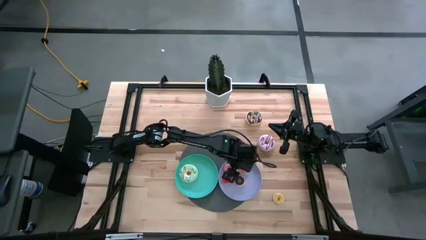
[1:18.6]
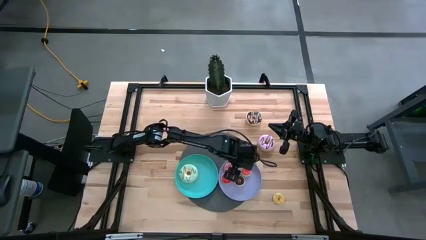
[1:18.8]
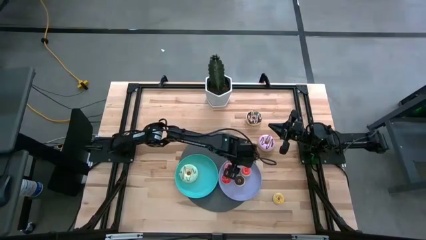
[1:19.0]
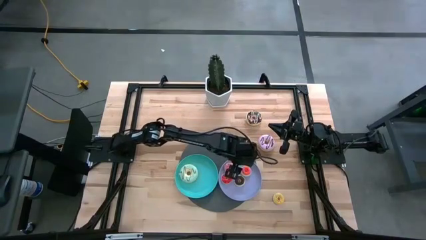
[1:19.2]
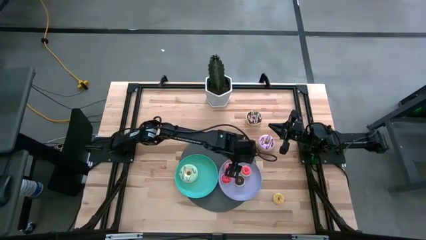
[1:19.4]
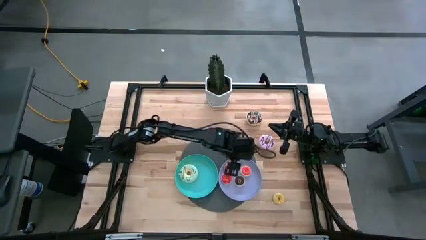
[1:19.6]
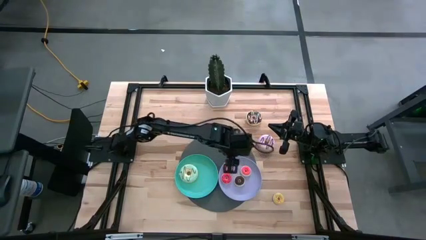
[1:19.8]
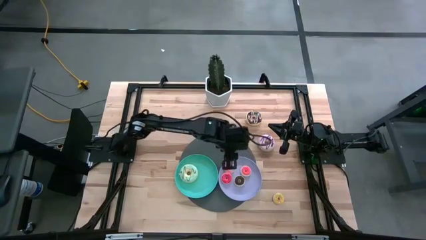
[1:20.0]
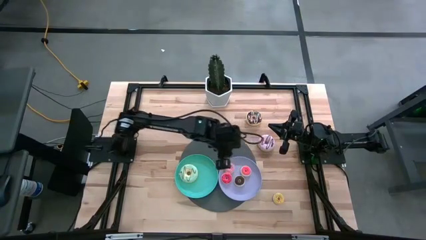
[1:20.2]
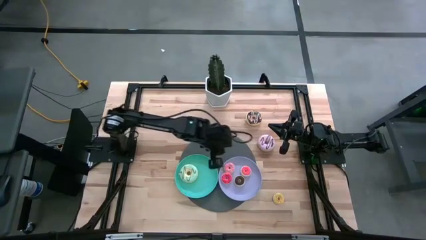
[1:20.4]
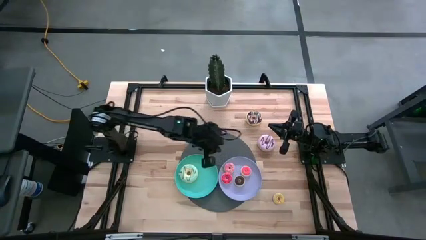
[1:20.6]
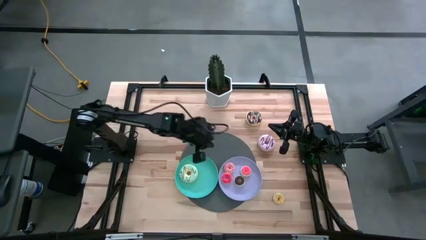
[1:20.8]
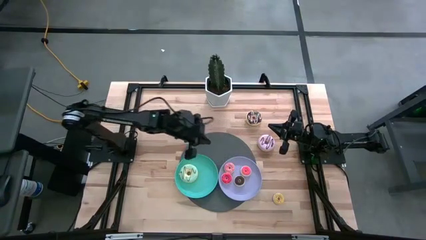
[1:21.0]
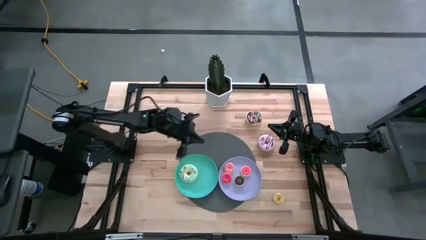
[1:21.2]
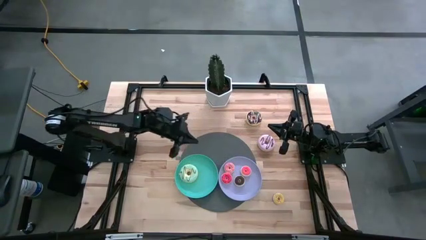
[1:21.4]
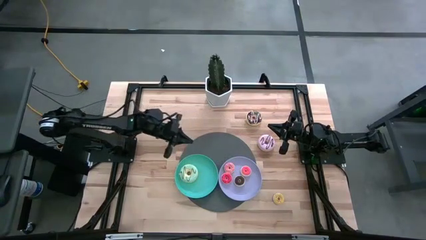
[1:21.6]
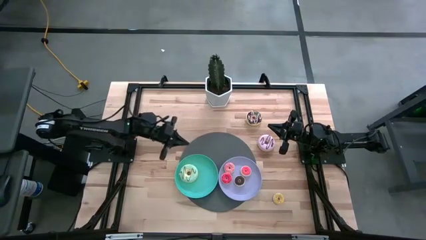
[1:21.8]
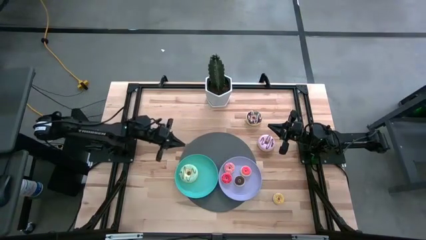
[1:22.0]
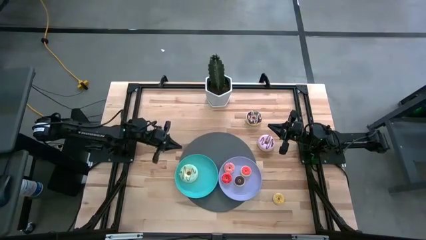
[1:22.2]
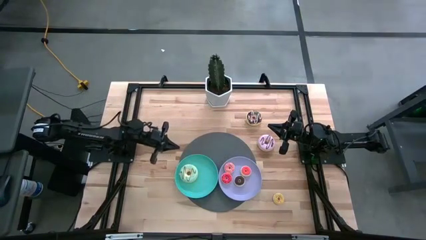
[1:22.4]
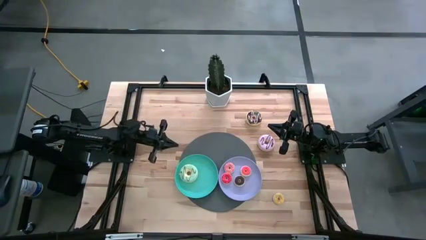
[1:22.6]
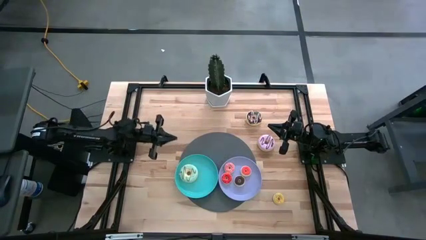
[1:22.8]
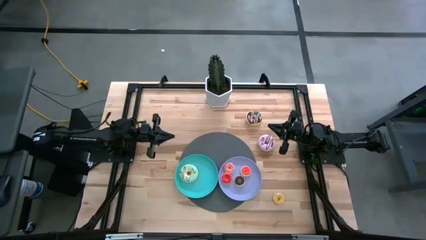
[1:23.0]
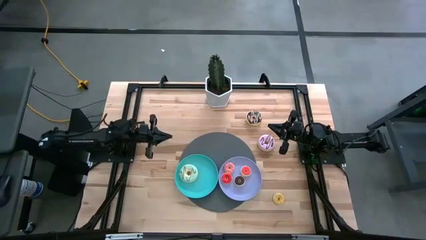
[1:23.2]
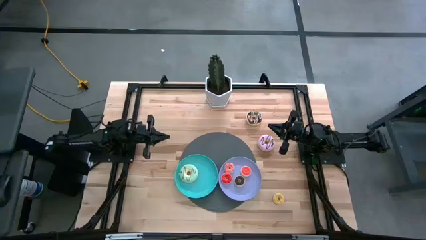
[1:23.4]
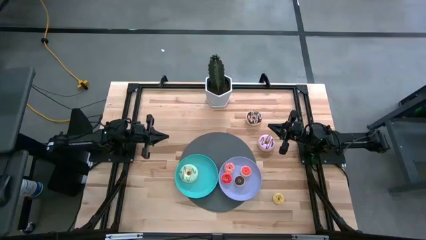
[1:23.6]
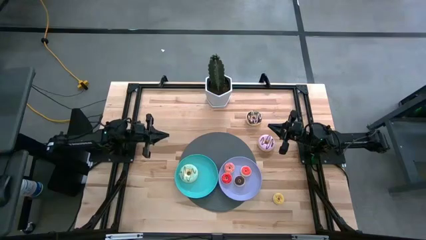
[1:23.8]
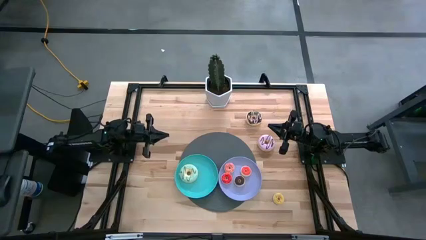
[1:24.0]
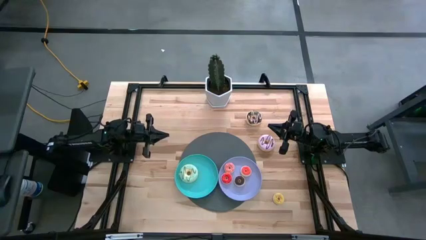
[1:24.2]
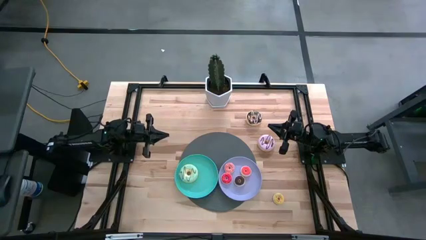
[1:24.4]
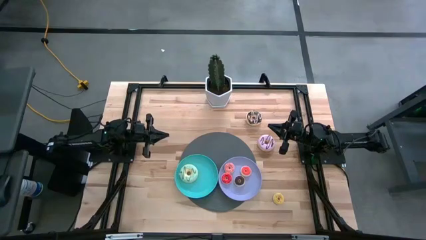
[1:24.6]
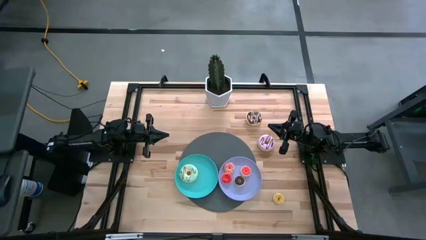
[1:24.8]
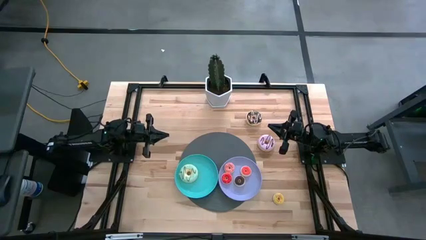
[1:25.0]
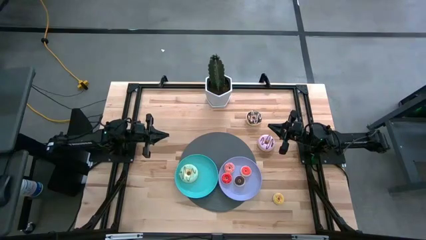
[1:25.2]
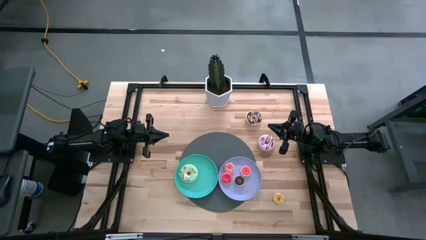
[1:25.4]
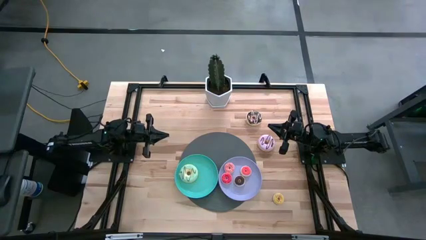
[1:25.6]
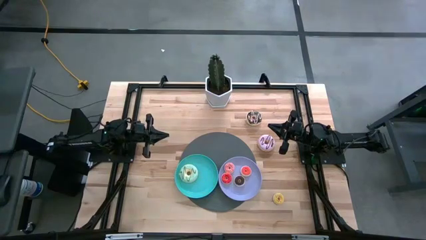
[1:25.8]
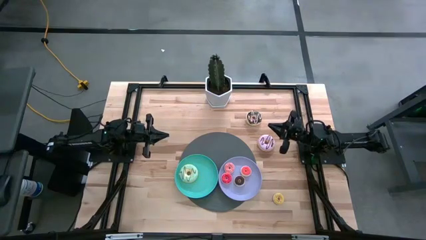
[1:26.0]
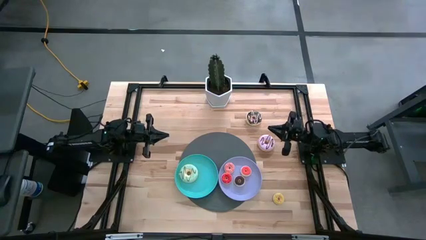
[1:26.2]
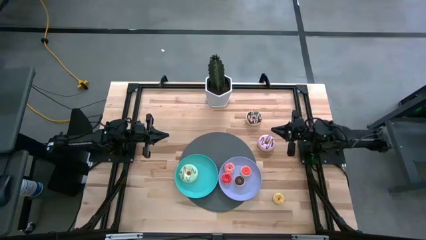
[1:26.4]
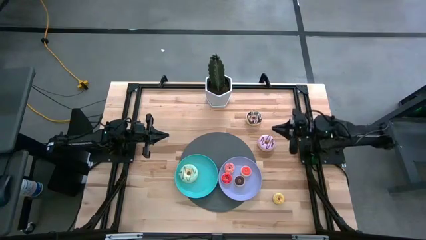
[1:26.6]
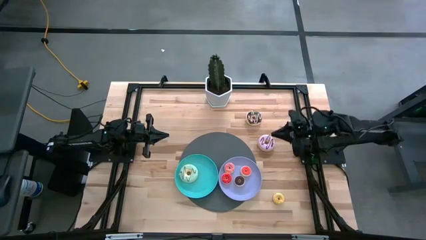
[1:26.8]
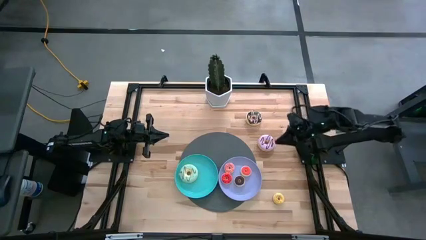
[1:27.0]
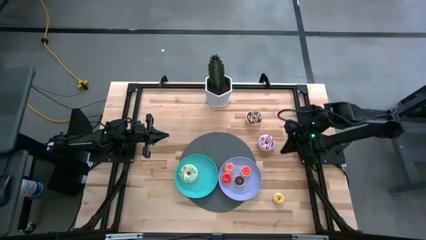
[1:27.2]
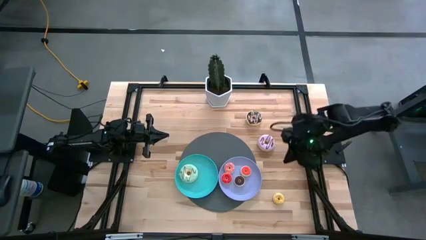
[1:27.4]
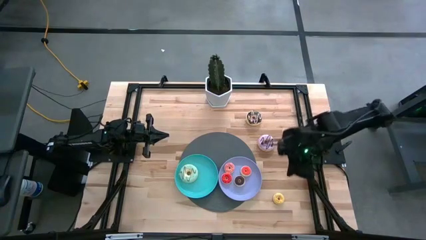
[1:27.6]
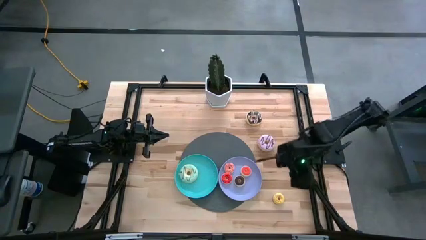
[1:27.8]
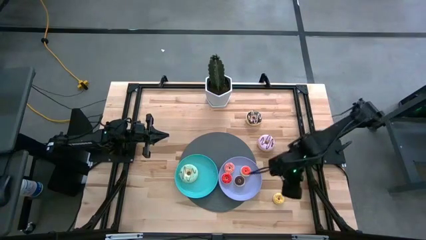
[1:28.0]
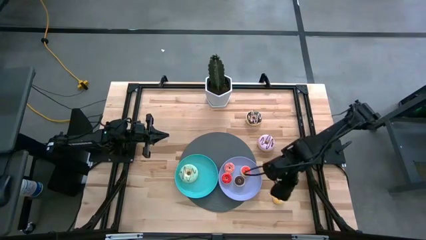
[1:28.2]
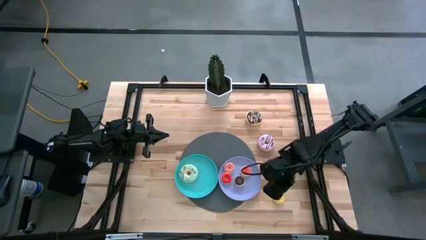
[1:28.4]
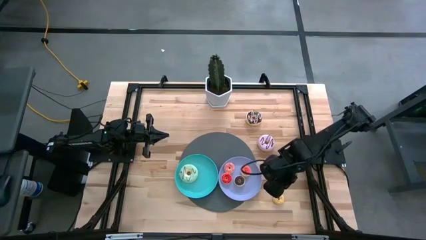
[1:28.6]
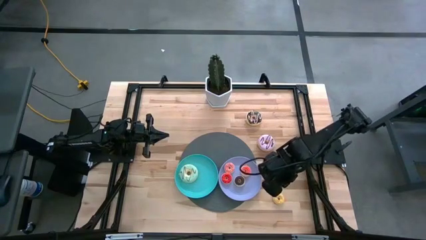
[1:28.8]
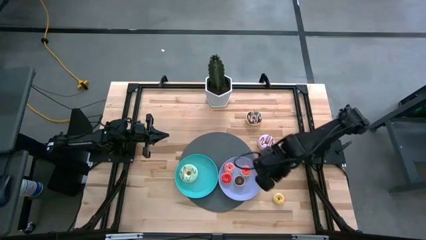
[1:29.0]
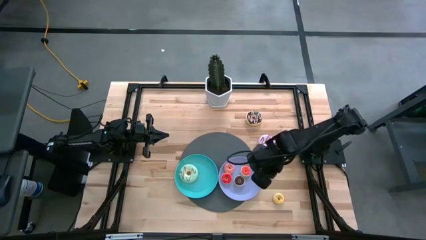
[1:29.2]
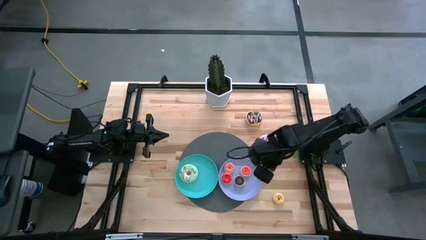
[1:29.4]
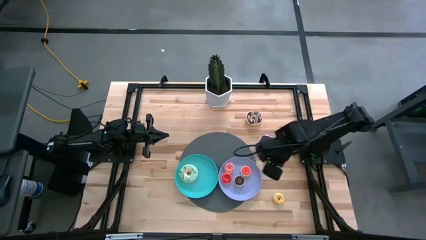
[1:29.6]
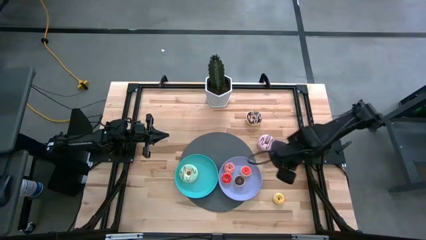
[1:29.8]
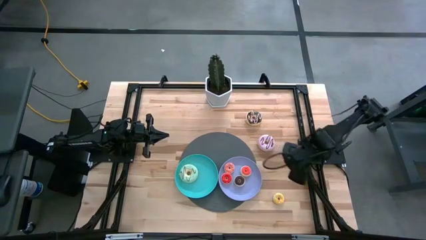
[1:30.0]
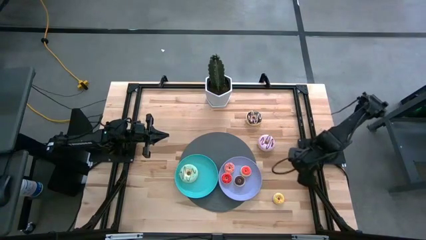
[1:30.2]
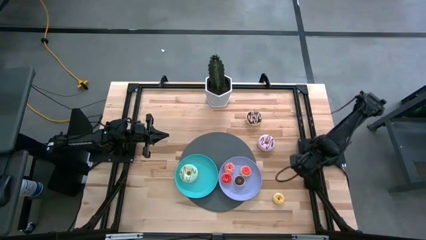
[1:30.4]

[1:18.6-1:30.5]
Task: Pick & Place donuts
Put the small yellow donut on the purple plate

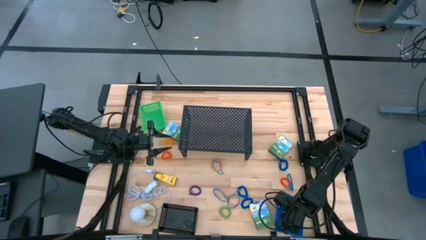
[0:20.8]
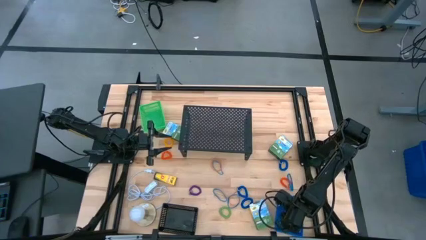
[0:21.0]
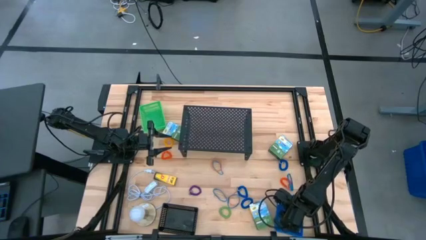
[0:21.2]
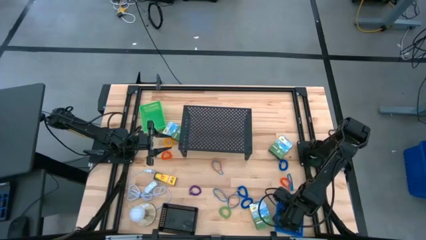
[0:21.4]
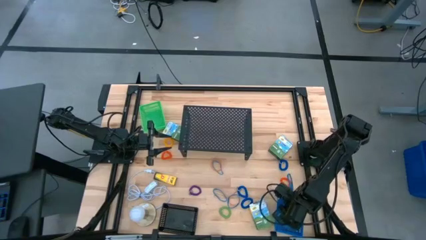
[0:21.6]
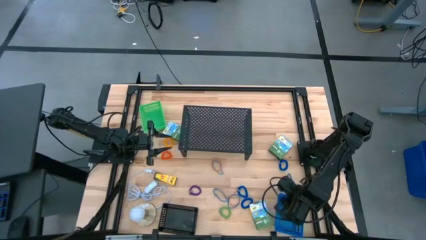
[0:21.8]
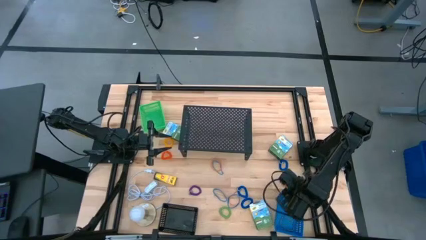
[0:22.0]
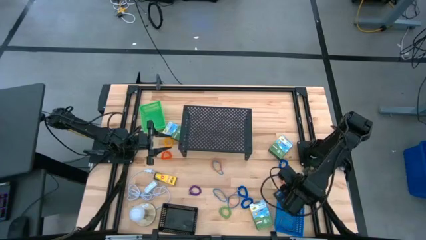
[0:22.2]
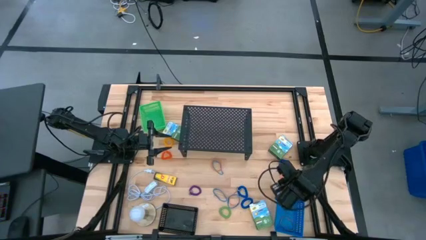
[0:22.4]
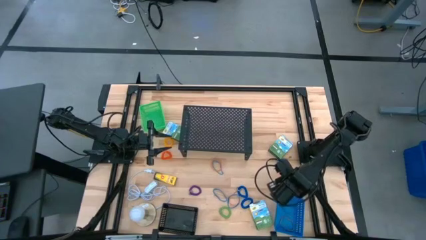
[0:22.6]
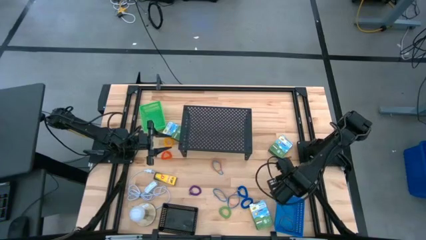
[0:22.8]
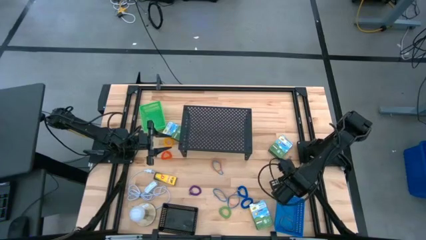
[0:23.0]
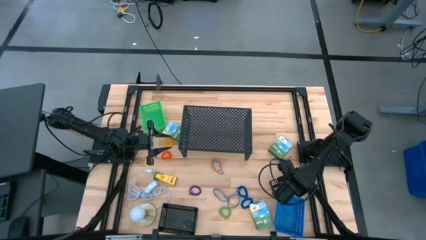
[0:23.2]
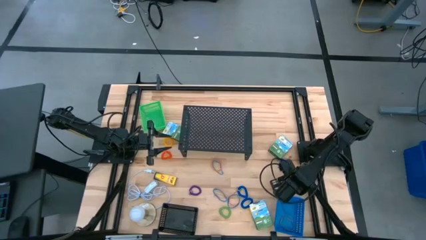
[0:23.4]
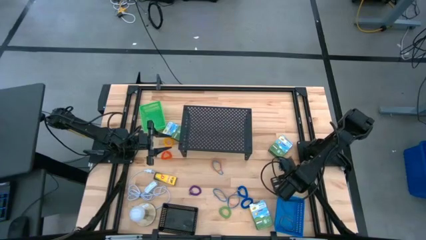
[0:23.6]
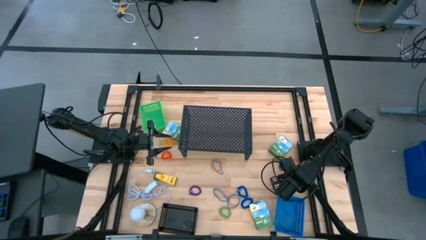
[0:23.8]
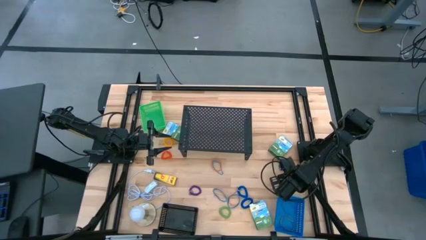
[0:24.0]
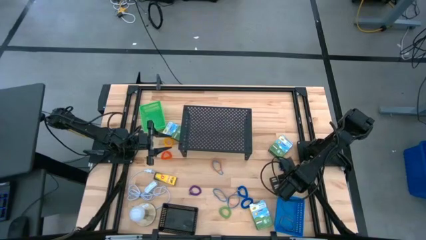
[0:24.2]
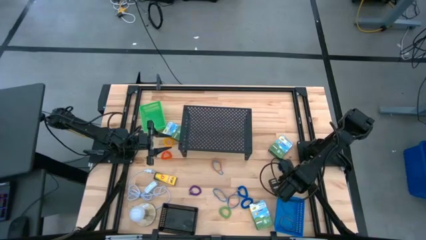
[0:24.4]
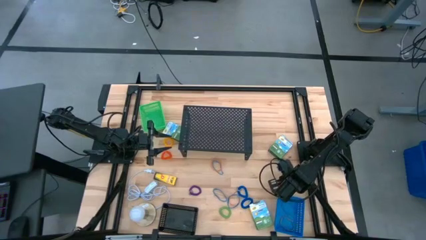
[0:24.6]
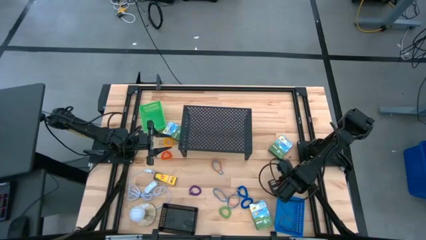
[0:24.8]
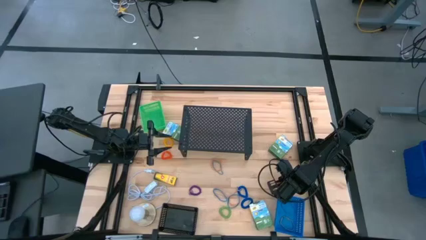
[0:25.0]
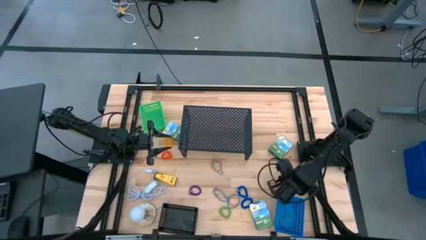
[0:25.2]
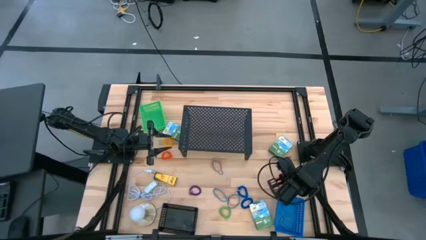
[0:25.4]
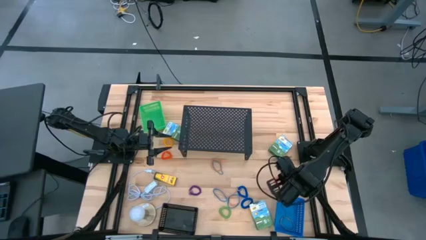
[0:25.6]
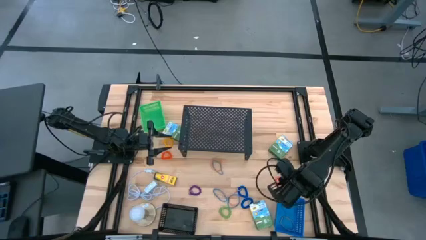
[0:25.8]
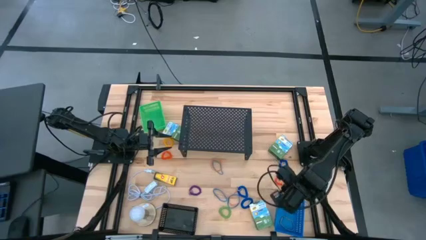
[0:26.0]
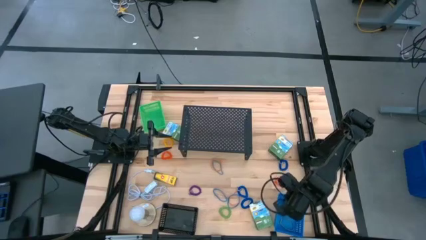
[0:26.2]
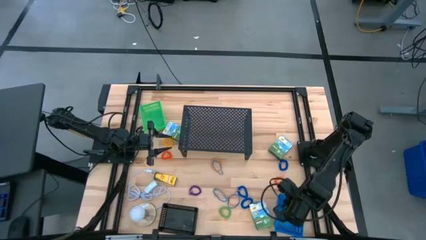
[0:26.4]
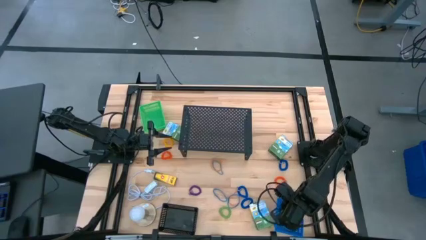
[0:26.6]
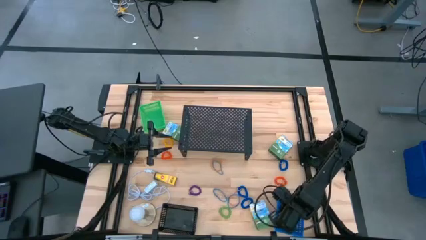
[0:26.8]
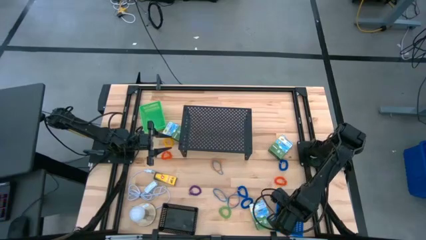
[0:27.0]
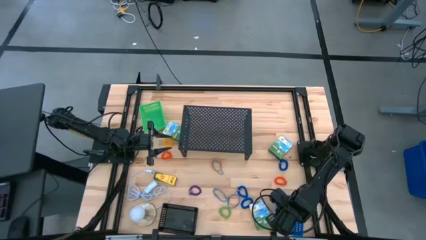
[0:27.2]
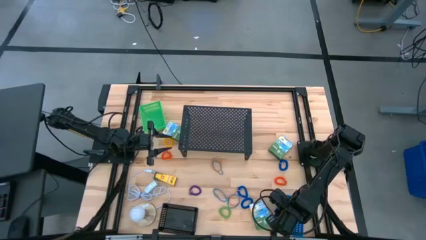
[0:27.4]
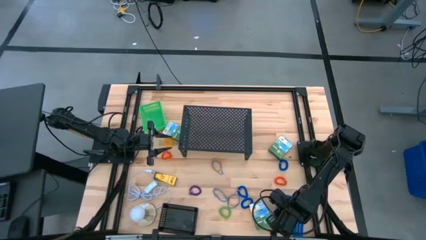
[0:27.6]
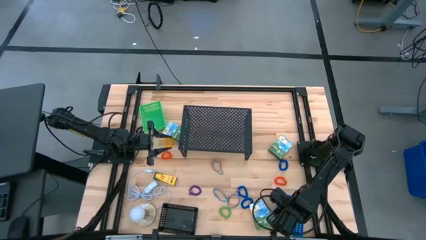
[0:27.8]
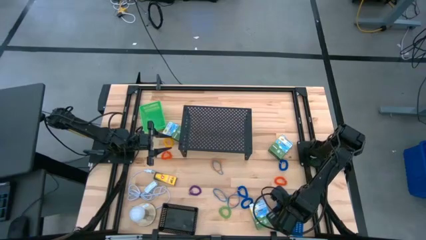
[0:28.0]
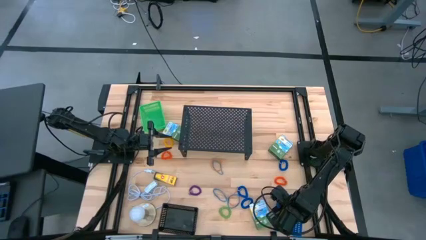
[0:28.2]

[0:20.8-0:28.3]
Task: Pick & Place Office Desk Supplies
Put the blue rubber band into the blue bin
